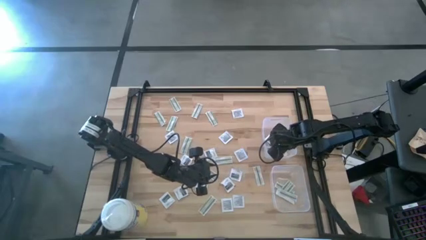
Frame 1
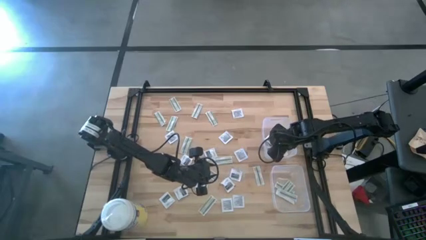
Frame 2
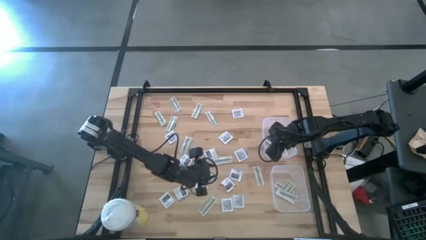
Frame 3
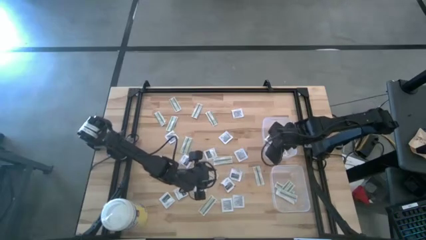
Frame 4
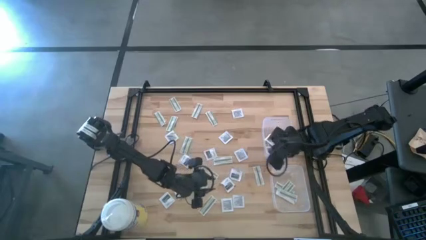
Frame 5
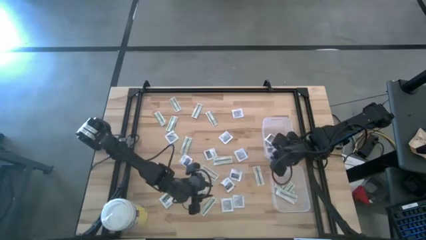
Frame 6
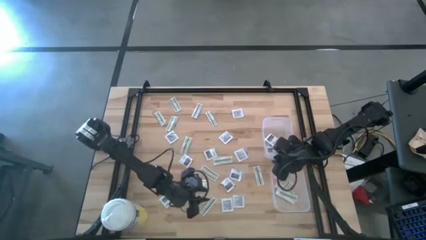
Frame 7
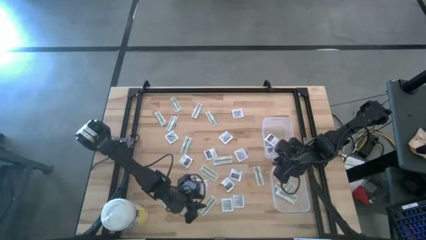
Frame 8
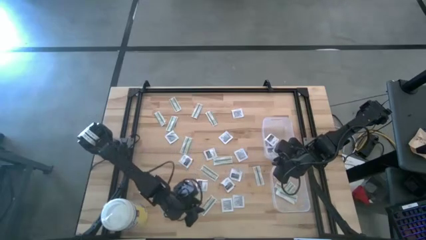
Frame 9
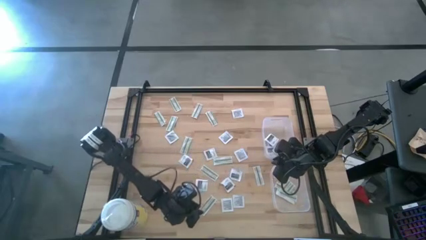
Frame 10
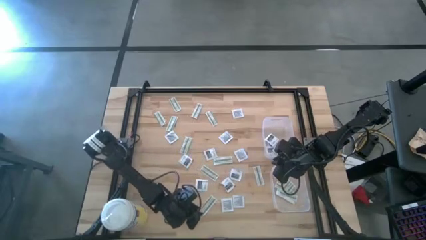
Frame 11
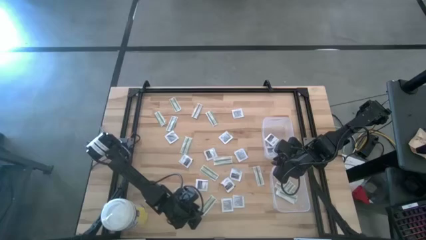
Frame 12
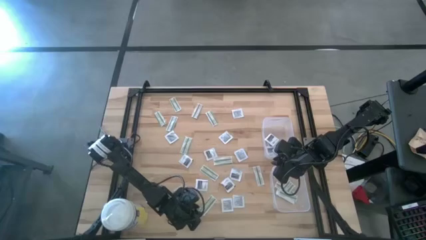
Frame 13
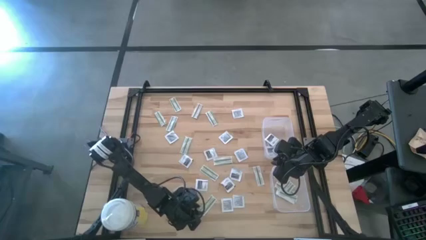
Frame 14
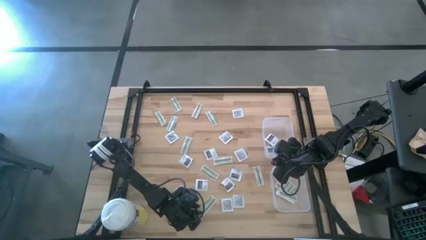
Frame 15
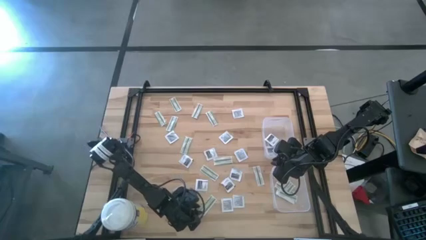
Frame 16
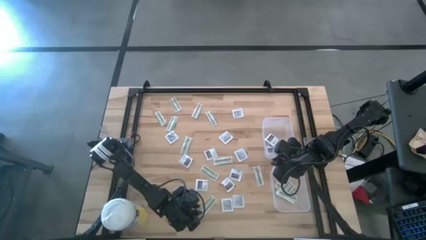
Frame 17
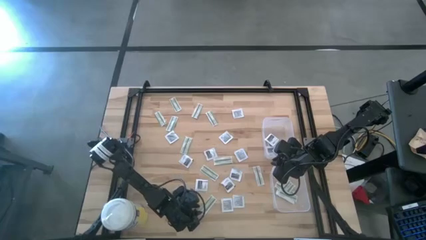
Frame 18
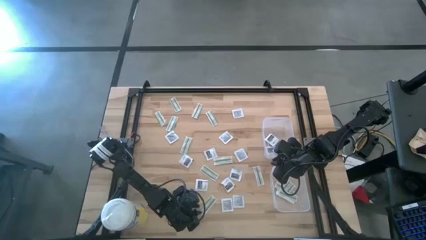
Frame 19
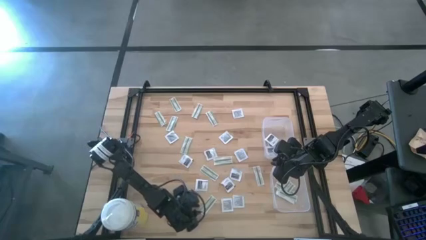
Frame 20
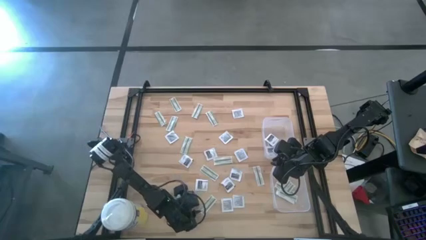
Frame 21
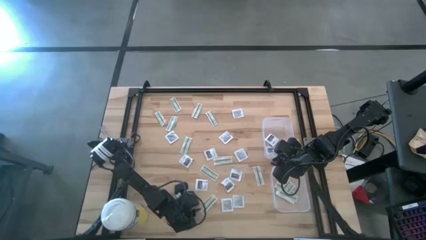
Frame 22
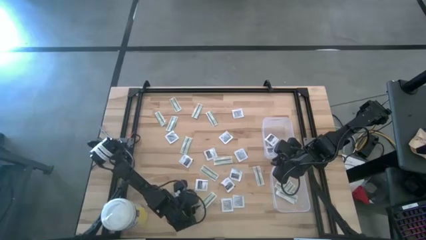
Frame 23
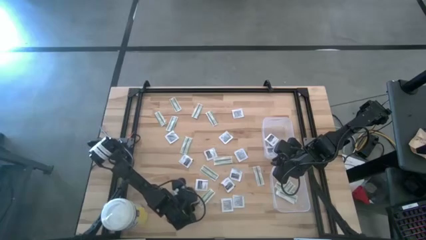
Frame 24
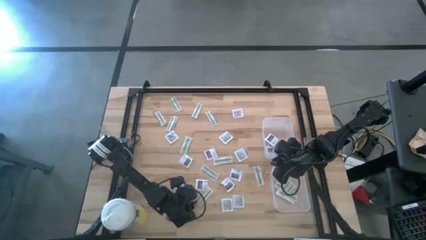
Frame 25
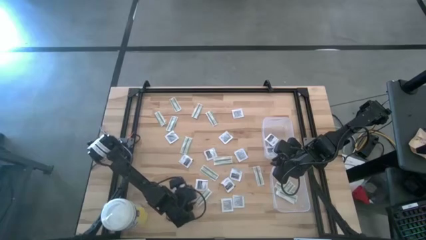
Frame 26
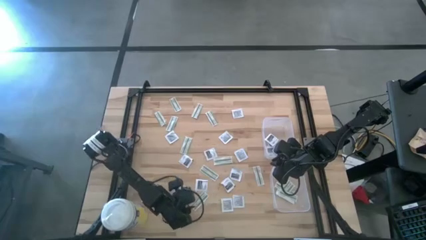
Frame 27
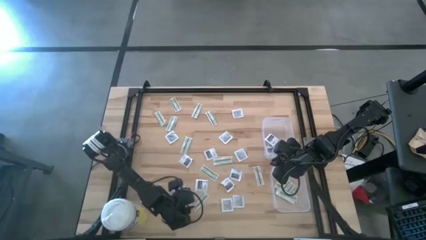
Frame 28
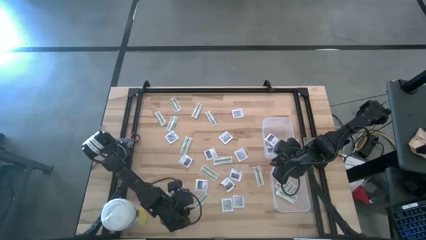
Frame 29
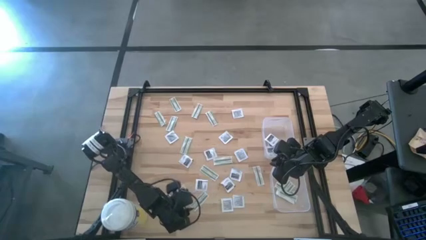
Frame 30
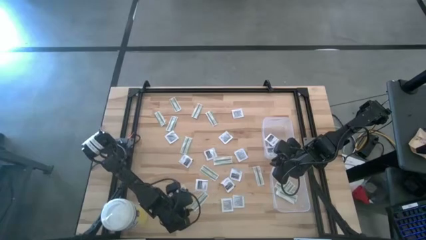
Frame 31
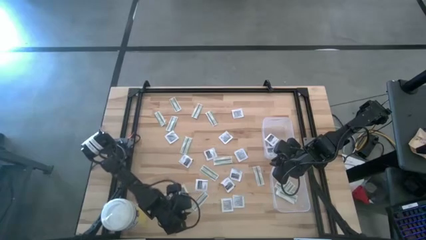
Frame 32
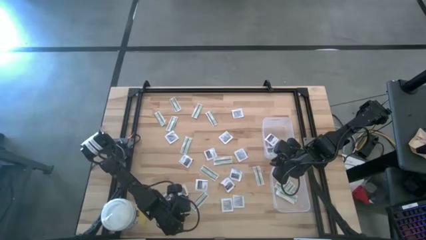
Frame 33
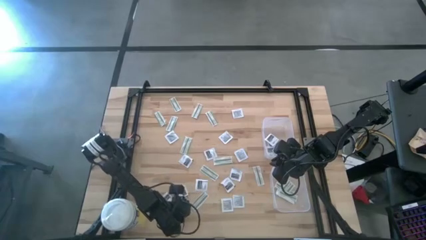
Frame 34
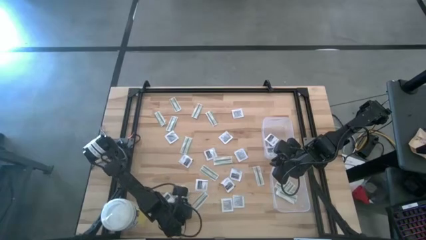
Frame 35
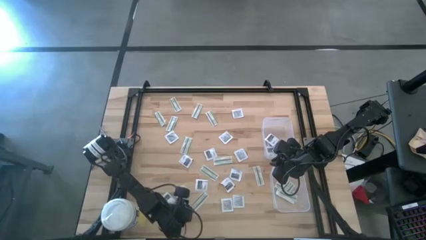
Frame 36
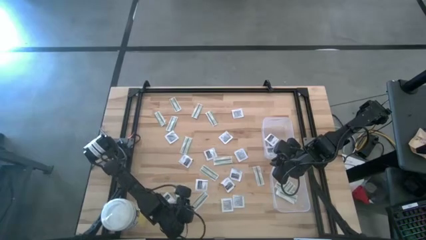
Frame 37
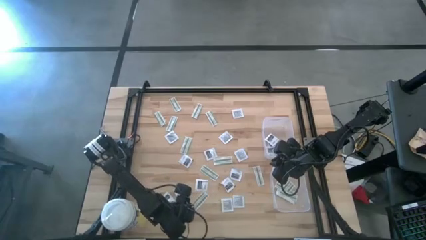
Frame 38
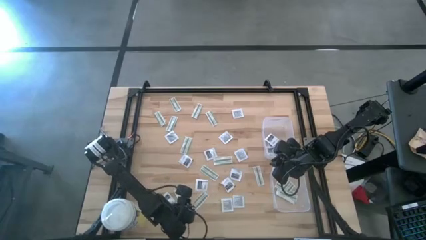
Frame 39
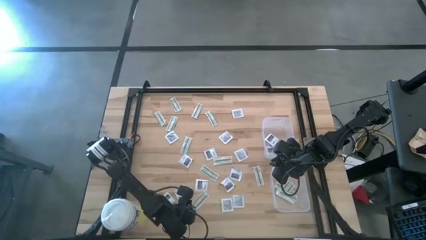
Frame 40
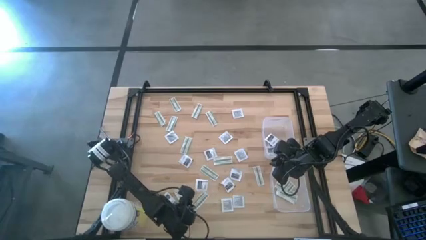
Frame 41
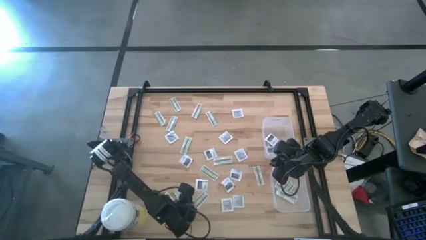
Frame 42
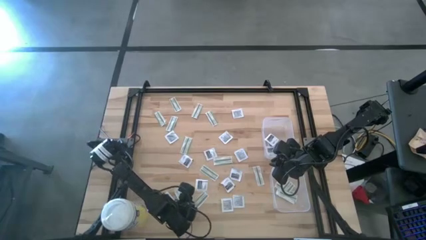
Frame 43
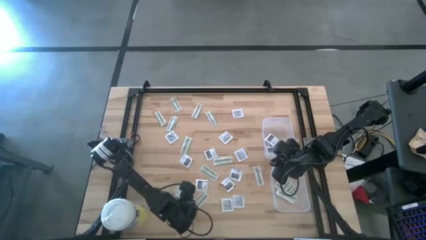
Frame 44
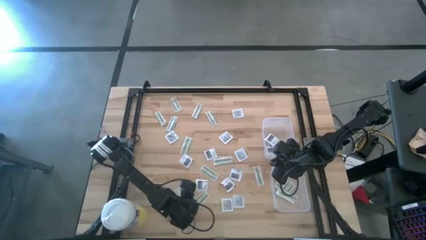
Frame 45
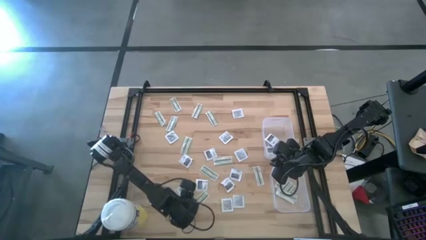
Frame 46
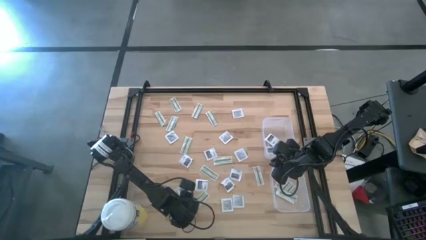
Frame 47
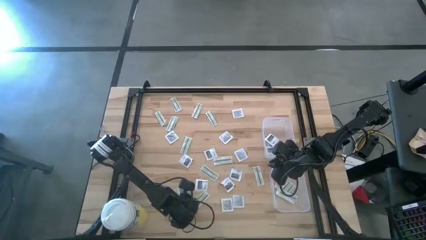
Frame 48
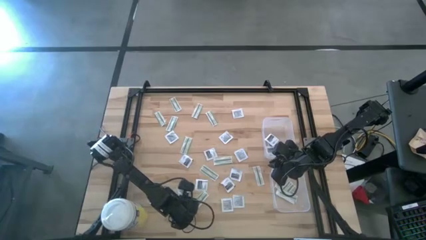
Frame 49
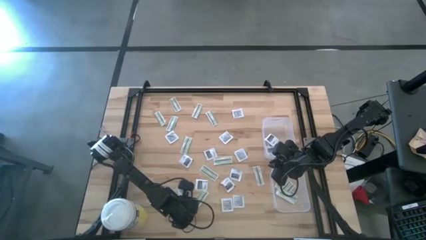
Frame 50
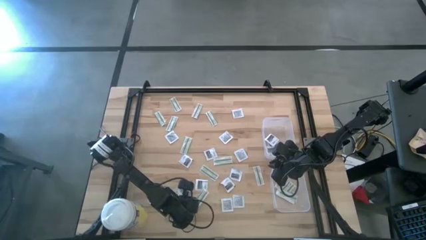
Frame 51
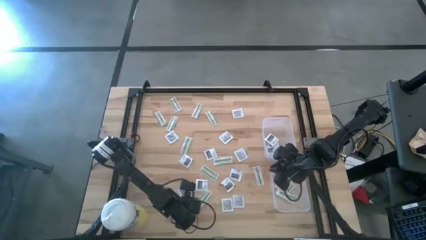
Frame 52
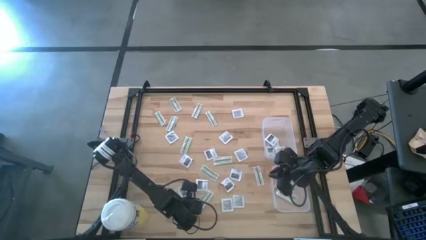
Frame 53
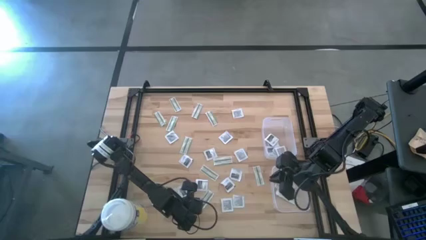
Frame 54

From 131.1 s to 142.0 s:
Task: Pick & Place First Aid Supplies
Put the bandage pack into the bottom bin

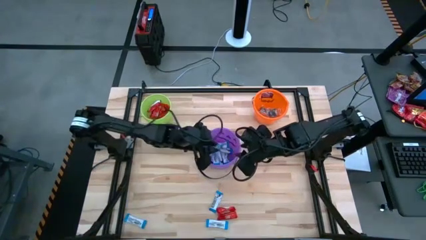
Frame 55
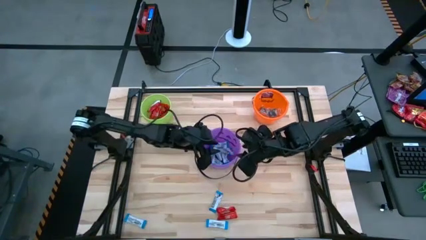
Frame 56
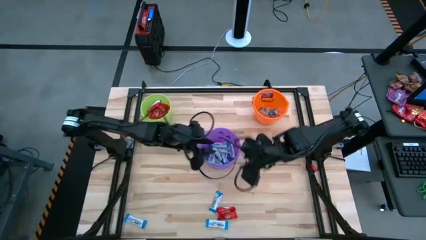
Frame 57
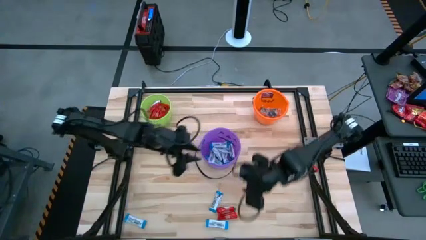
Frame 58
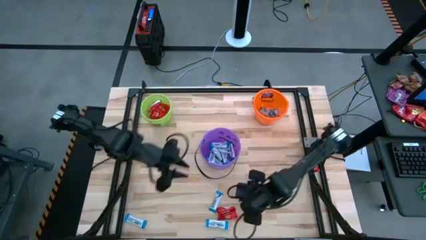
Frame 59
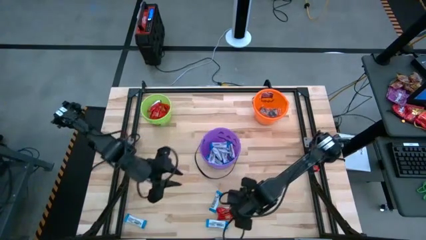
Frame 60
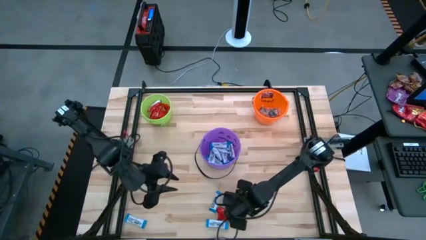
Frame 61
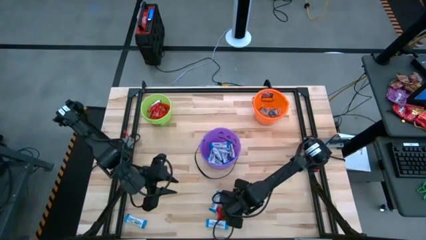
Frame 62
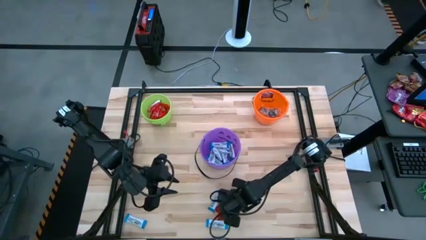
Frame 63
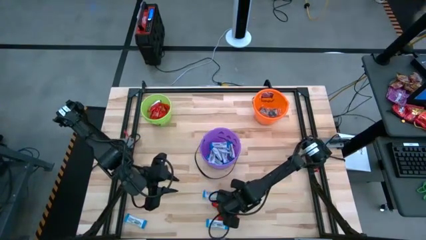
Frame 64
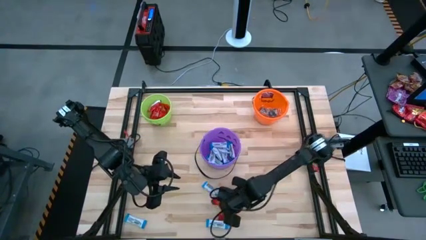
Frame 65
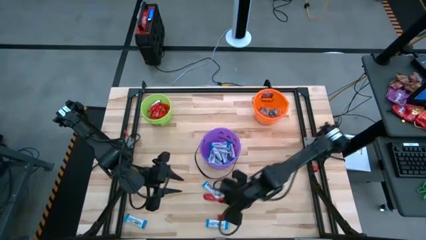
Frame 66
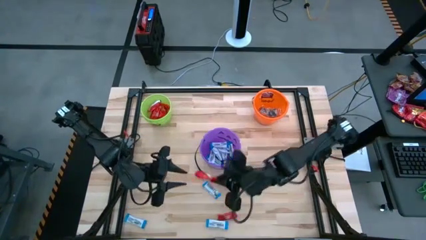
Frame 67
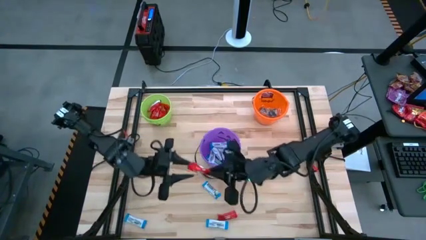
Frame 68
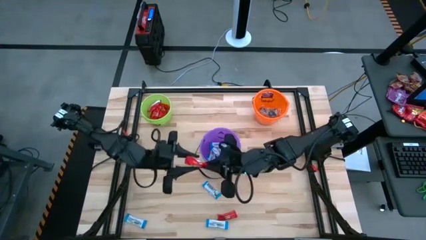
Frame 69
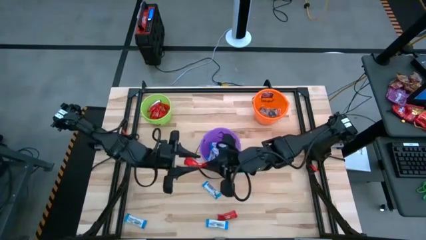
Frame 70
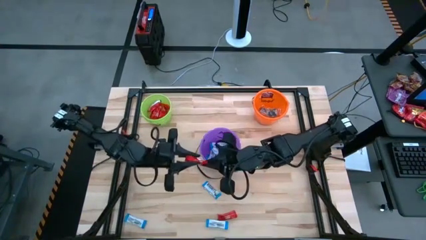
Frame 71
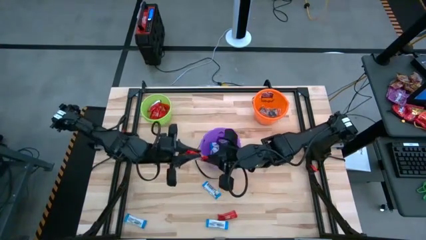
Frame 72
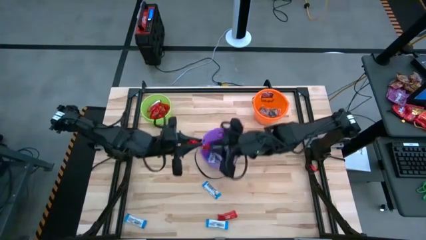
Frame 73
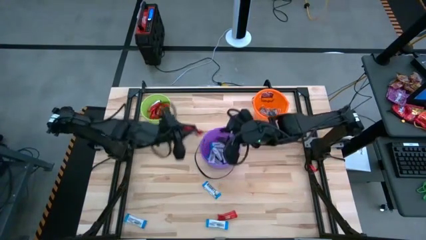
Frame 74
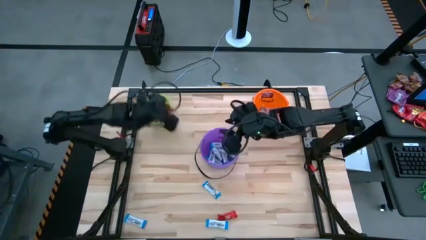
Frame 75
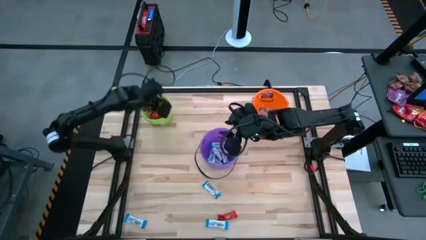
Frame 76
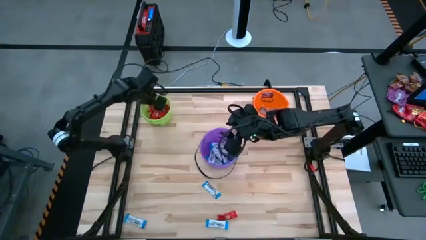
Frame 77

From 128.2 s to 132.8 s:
Task: Sort candy by brand, put in halloween buckets
Put the red chocolate into the green bucket
